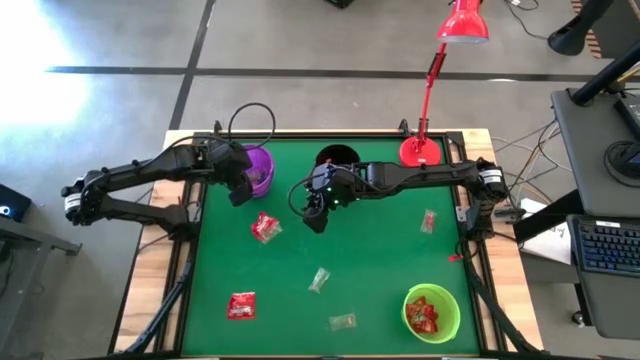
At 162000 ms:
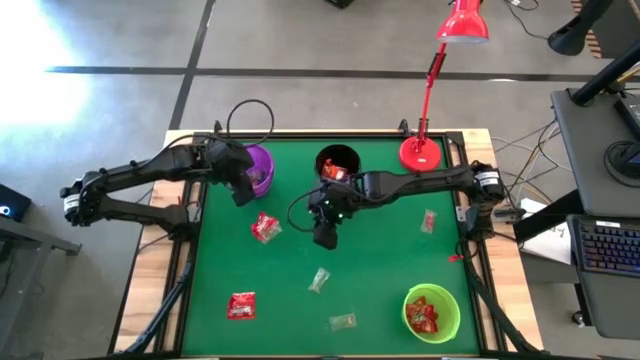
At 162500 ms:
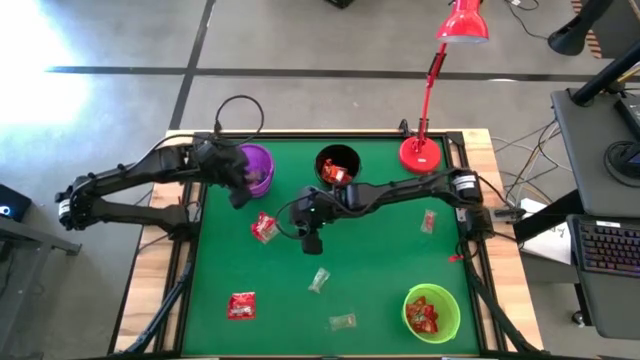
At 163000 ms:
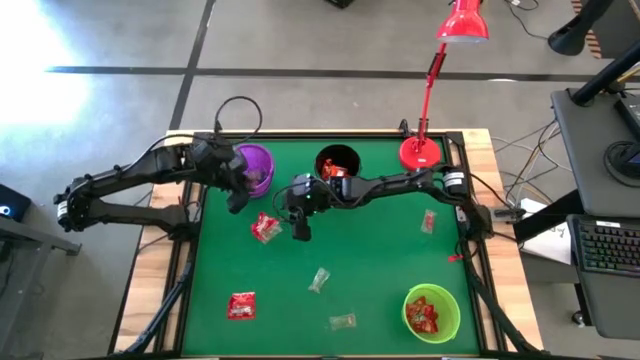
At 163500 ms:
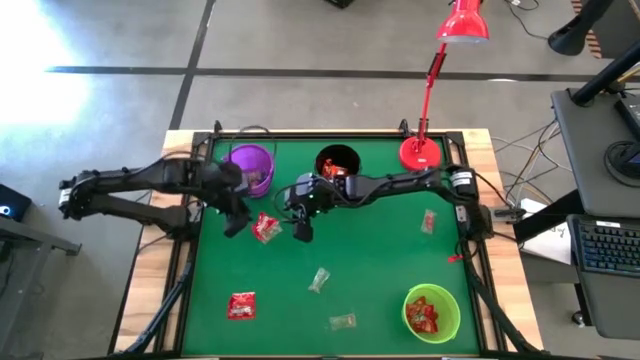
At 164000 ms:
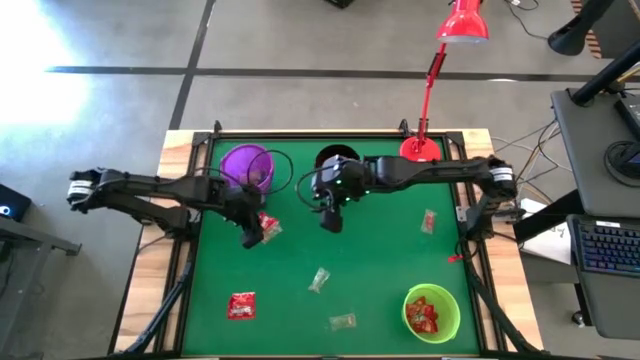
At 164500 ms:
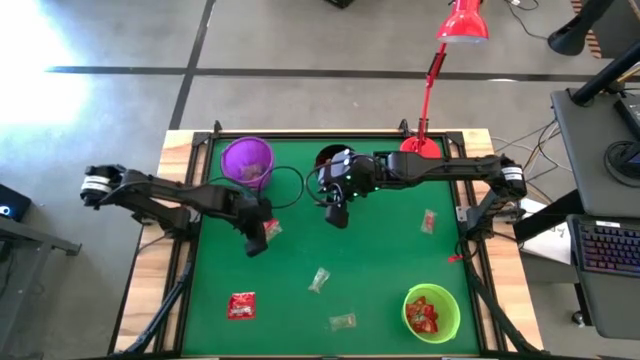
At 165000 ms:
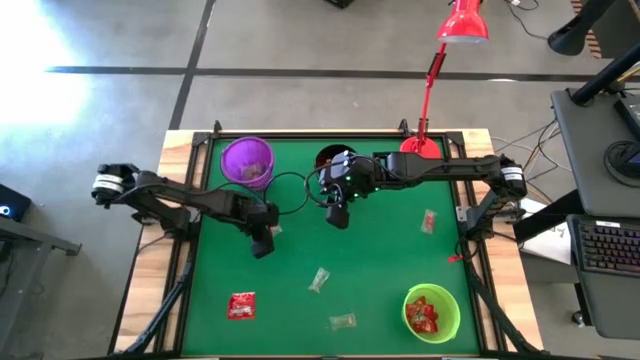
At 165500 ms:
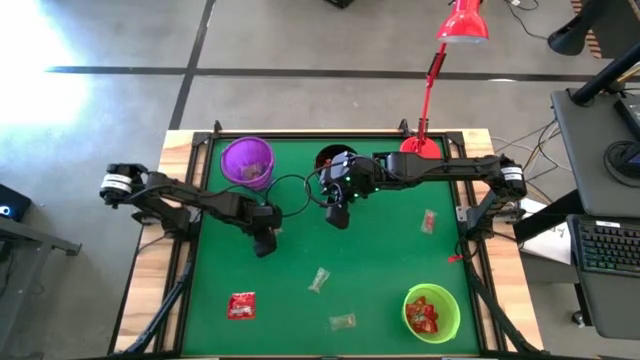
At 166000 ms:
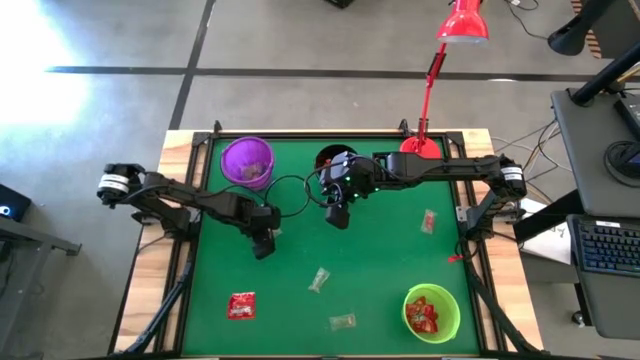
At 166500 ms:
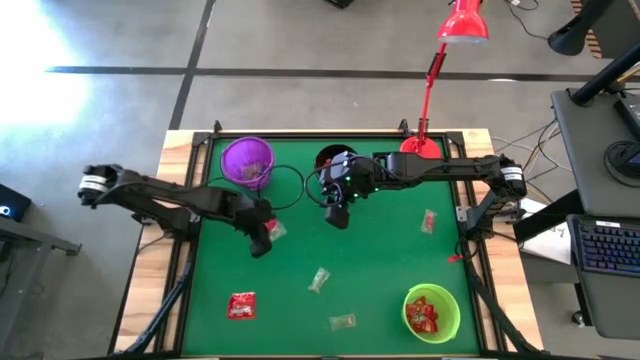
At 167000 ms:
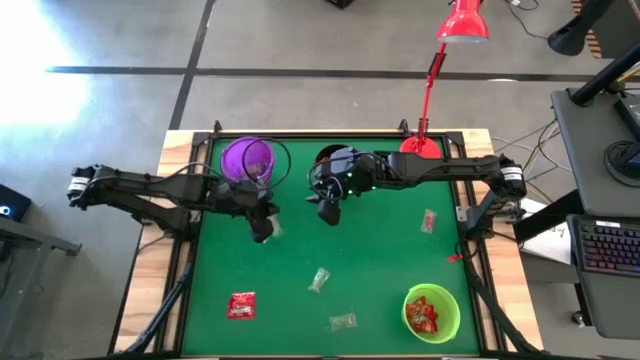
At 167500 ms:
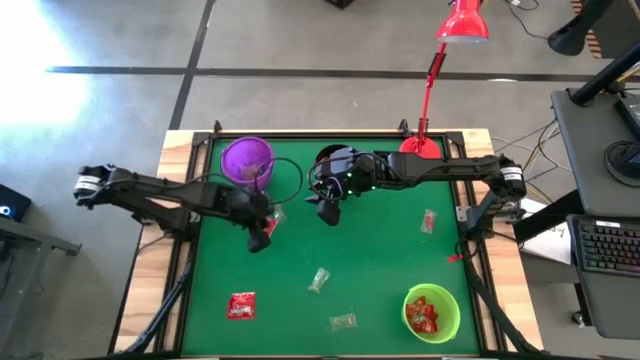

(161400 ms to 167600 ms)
Task: Sort candy
Put the green gummy into the violet bucket

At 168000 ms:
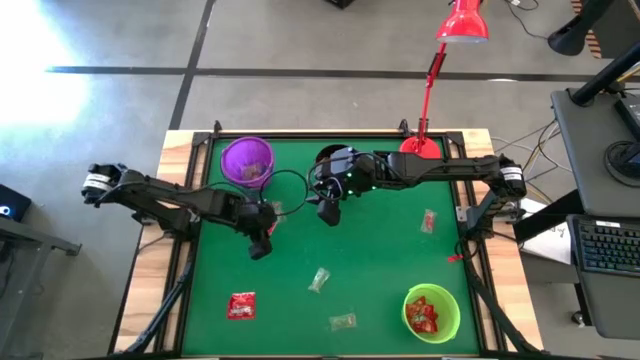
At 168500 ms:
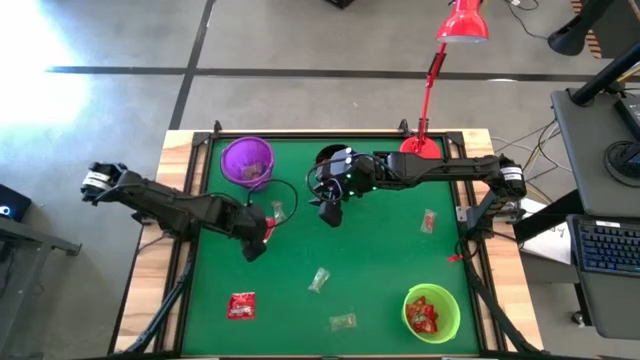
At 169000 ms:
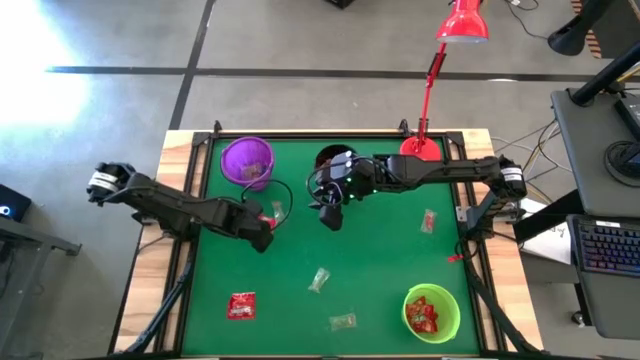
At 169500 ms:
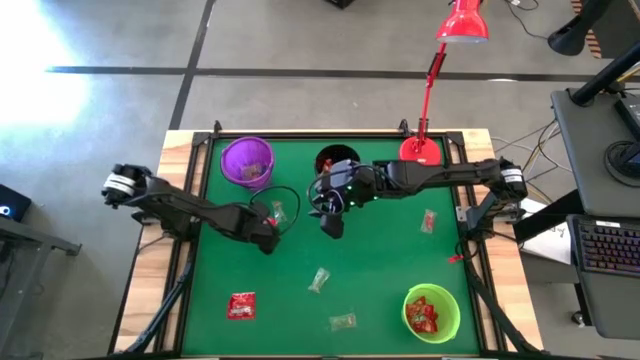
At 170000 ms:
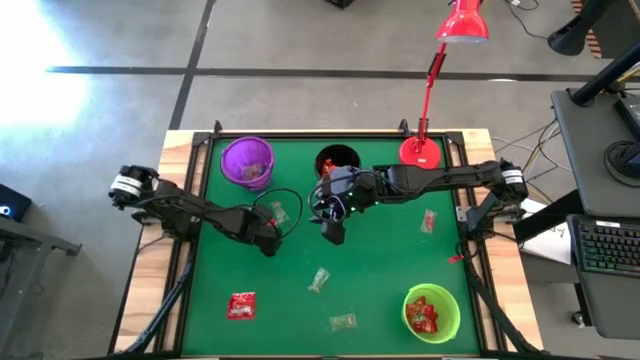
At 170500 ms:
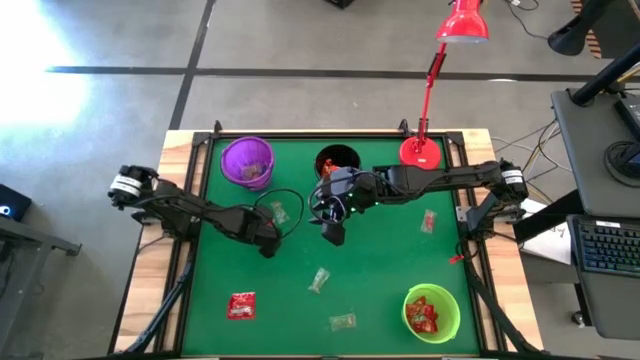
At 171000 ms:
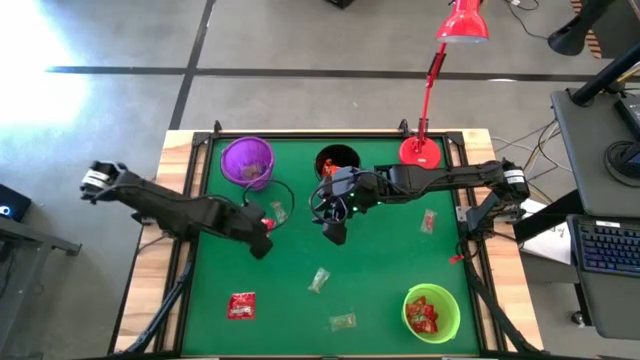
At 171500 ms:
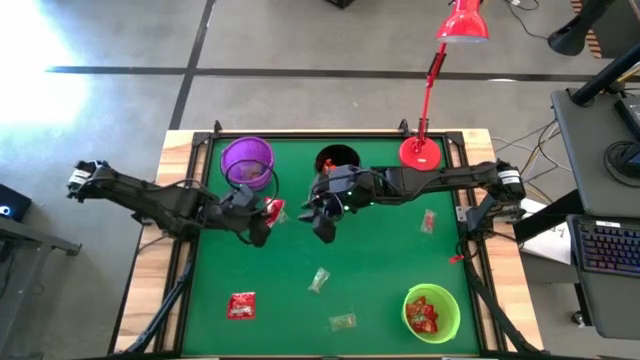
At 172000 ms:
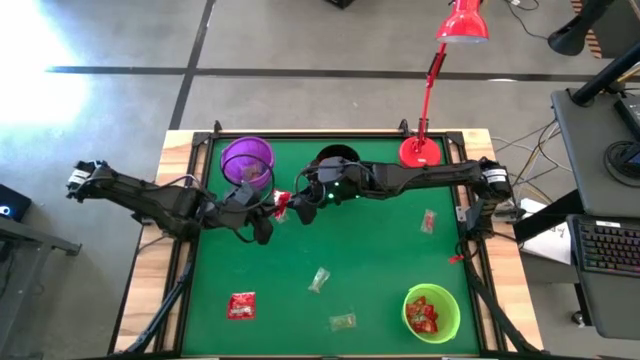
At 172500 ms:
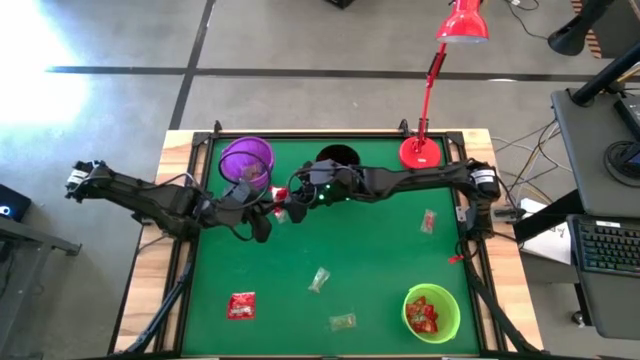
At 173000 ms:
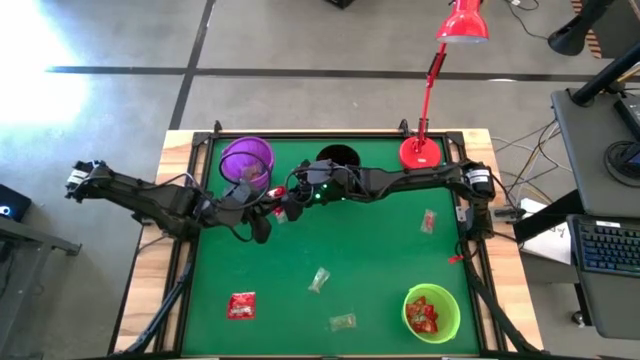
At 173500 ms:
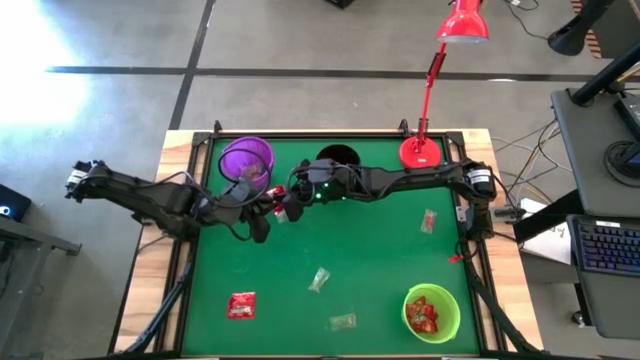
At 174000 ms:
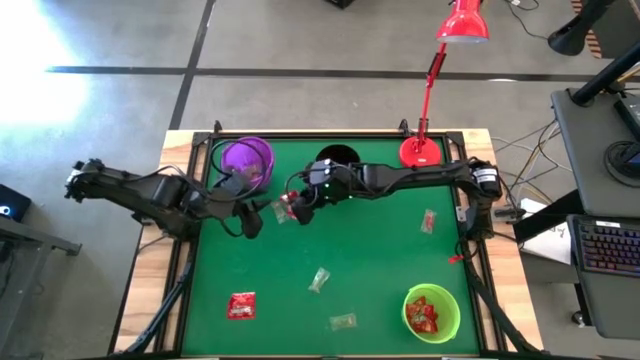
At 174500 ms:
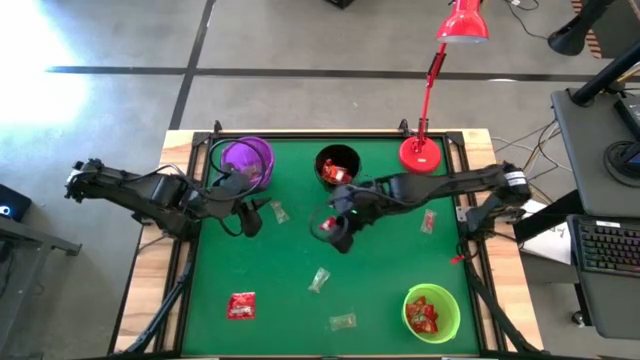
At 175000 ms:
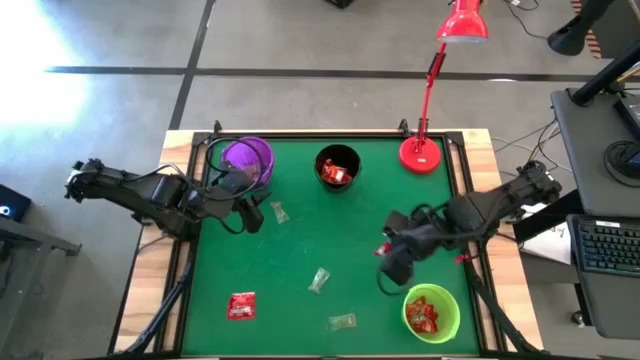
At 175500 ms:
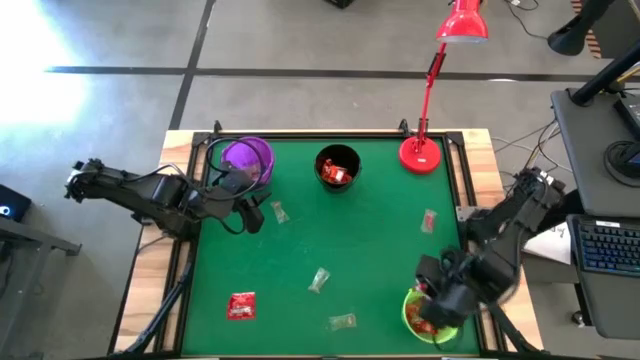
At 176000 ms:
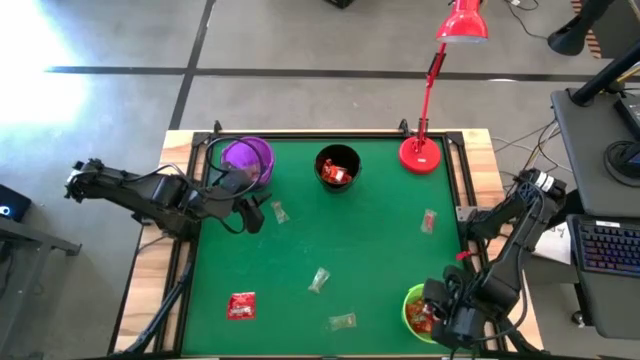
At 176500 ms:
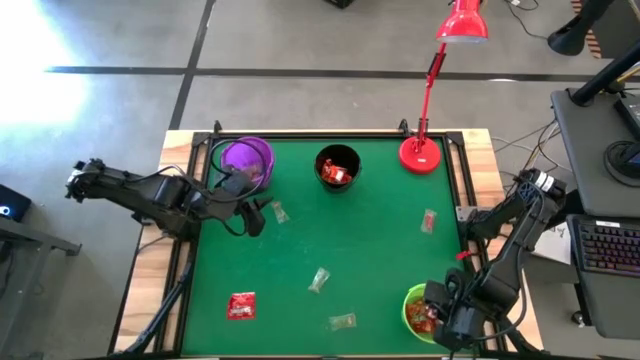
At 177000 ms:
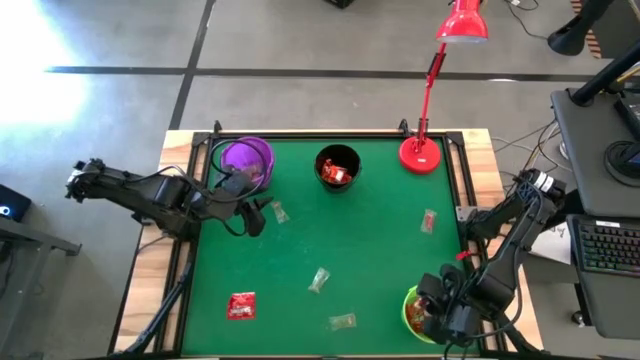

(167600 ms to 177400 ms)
Put the red candy into the green bucket

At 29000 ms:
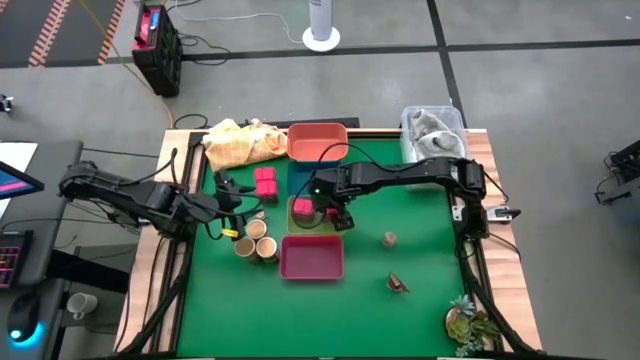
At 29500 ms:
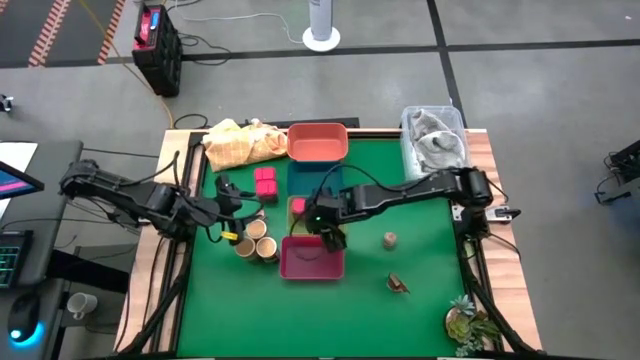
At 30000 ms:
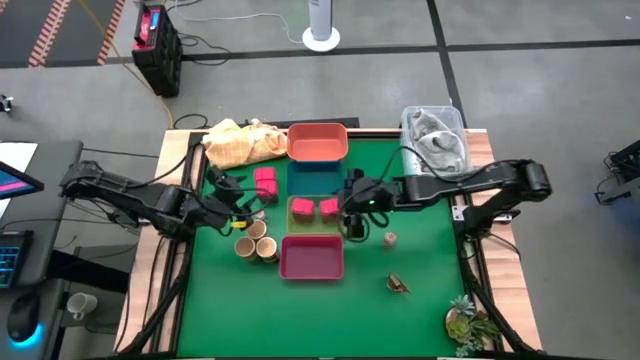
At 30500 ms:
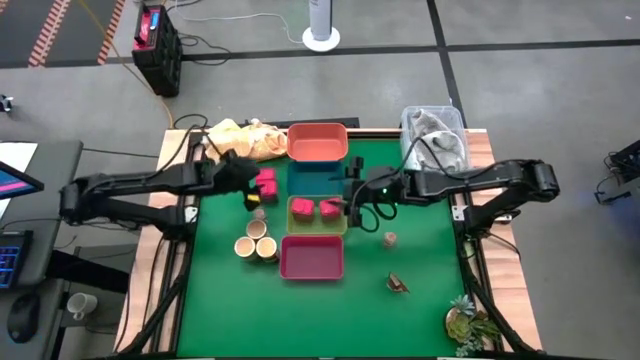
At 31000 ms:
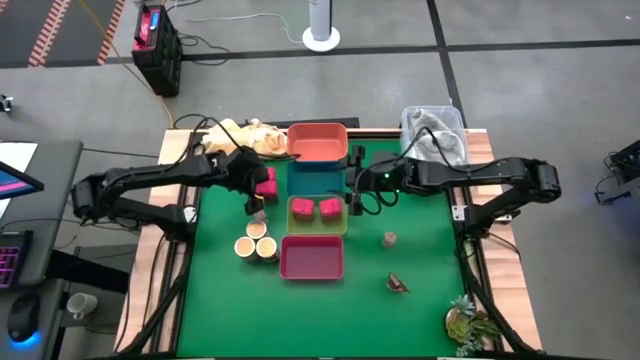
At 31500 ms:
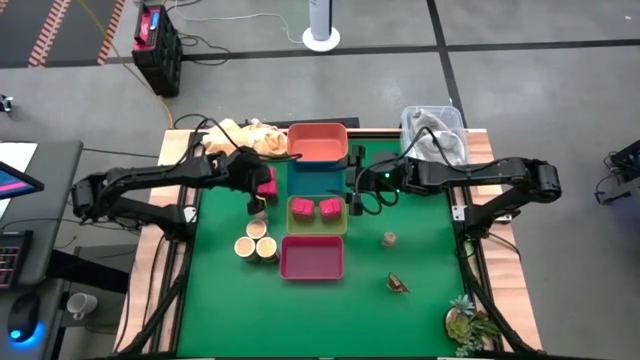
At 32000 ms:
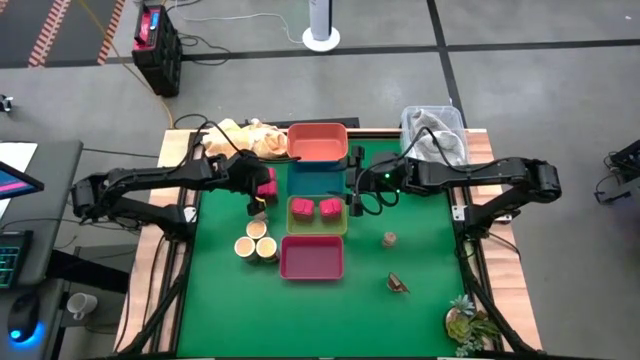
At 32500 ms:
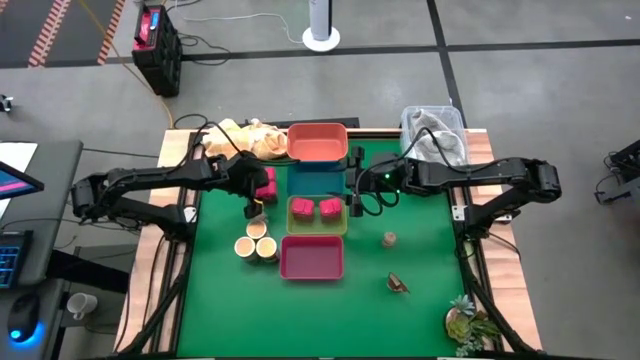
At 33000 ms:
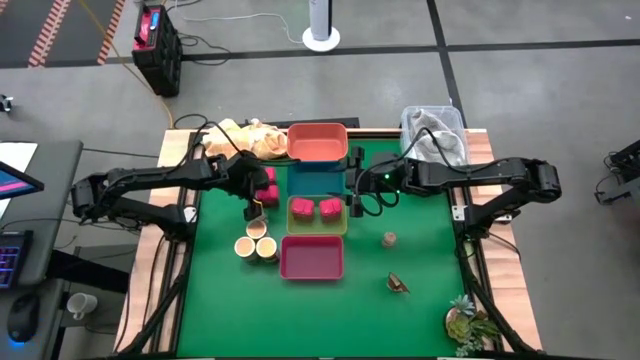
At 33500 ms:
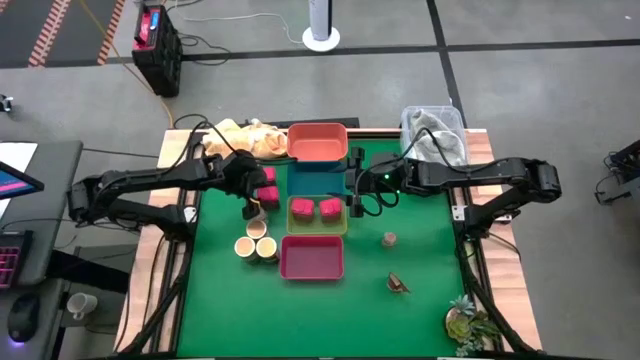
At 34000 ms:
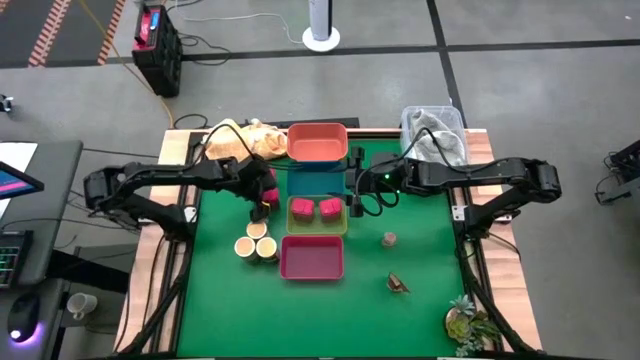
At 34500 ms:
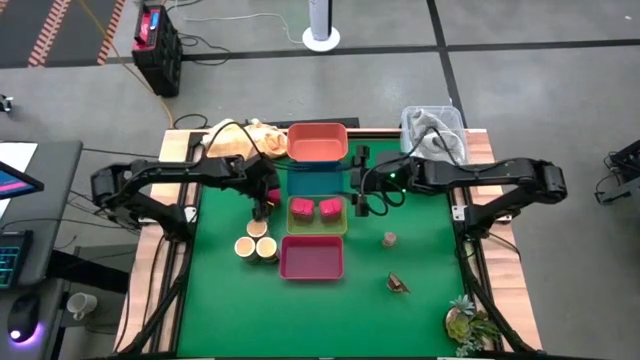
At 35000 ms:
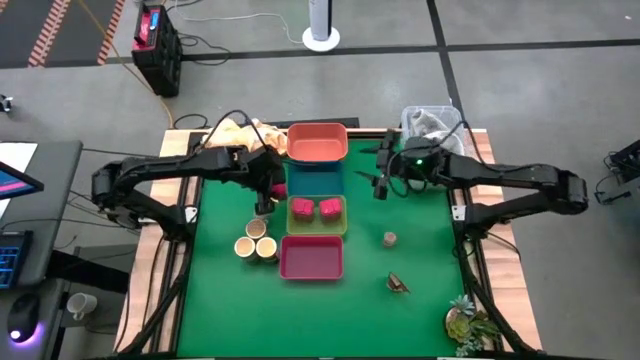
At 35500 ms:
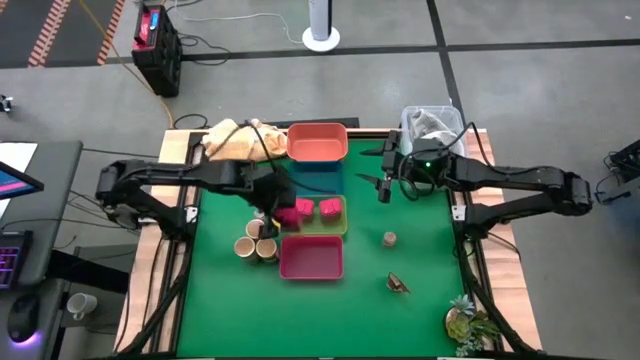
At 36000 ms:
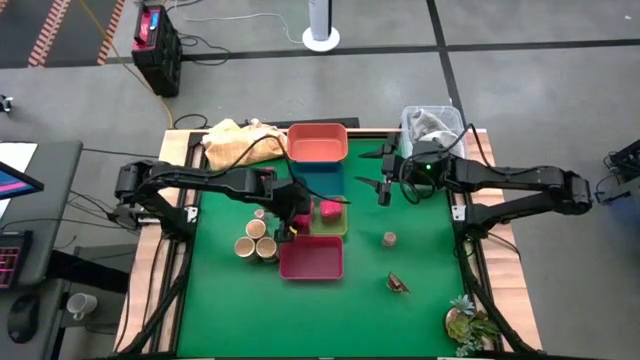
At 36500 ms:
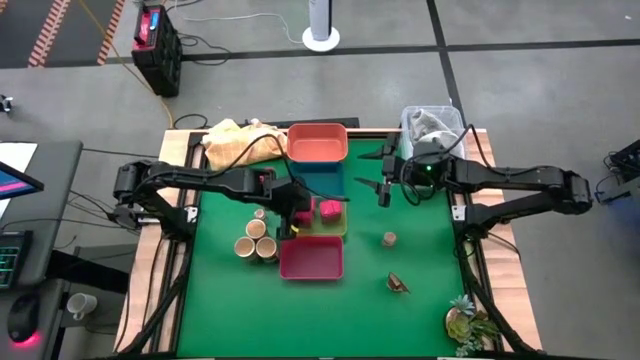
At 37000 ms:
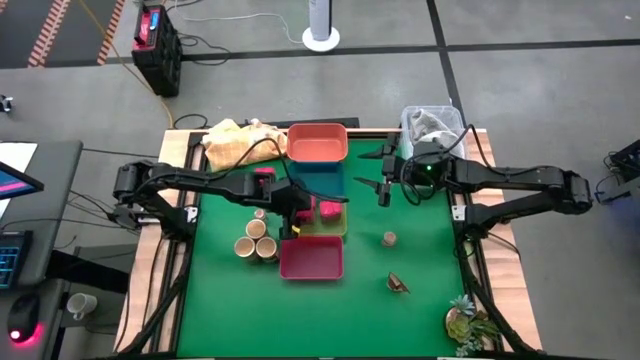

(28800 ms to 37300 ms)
Task: Sort spices by type
Put the bottom red seasoning bottle into the green bin
